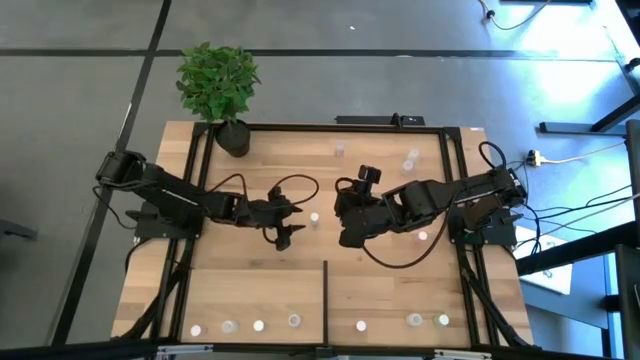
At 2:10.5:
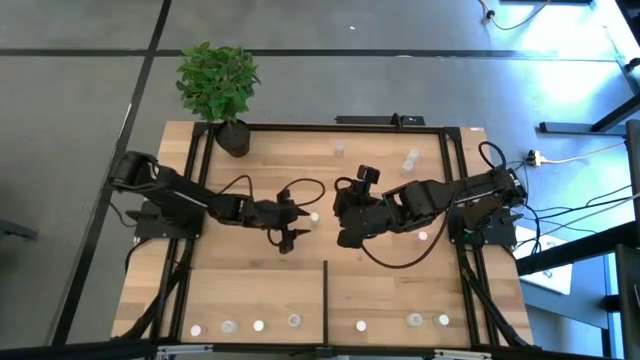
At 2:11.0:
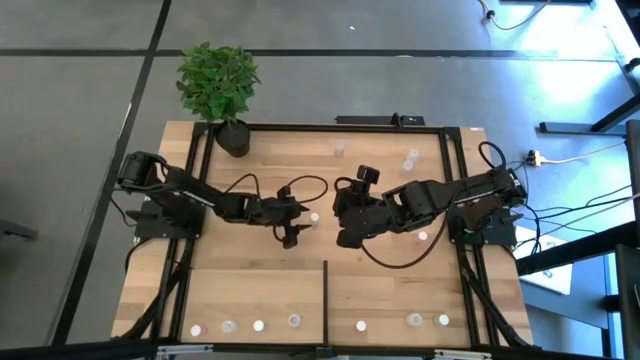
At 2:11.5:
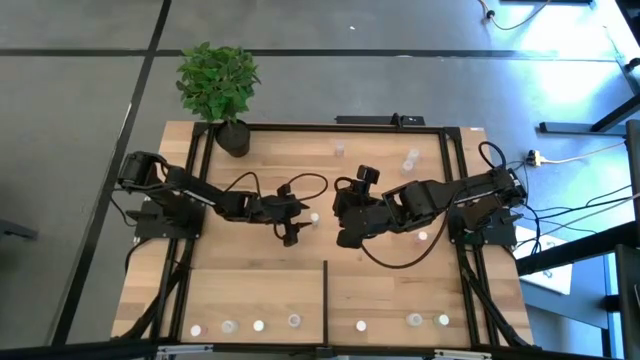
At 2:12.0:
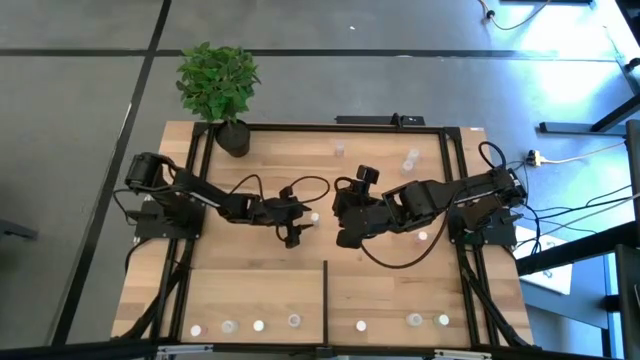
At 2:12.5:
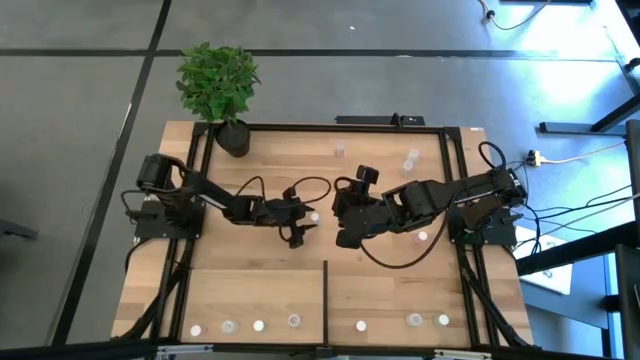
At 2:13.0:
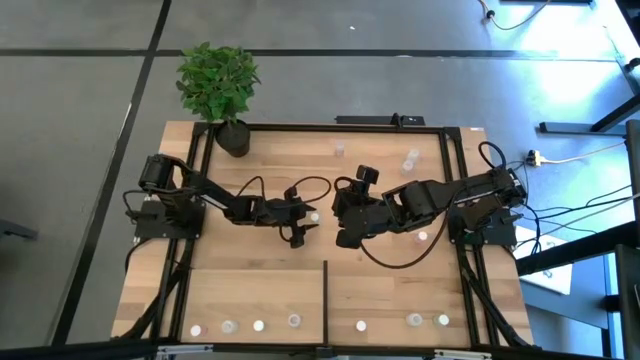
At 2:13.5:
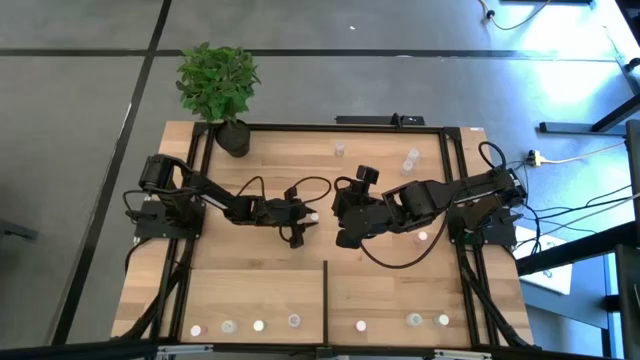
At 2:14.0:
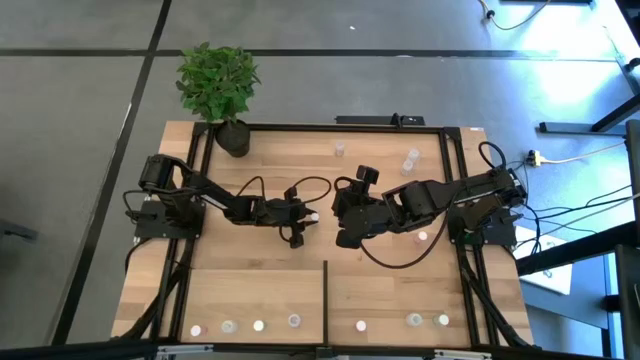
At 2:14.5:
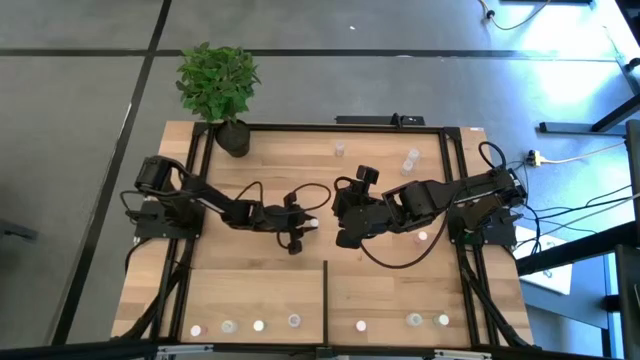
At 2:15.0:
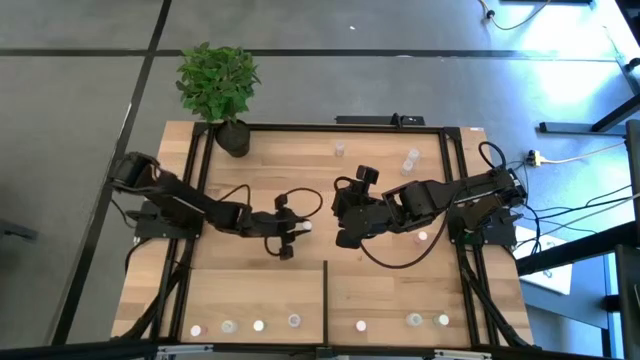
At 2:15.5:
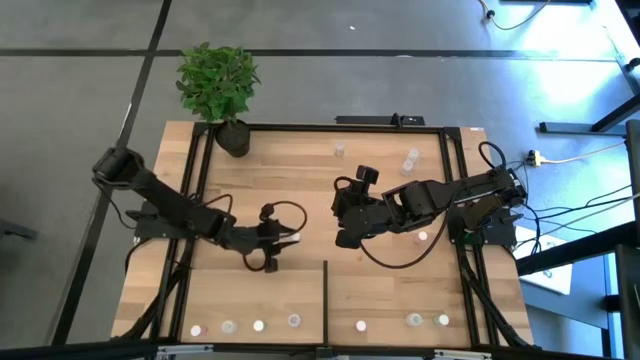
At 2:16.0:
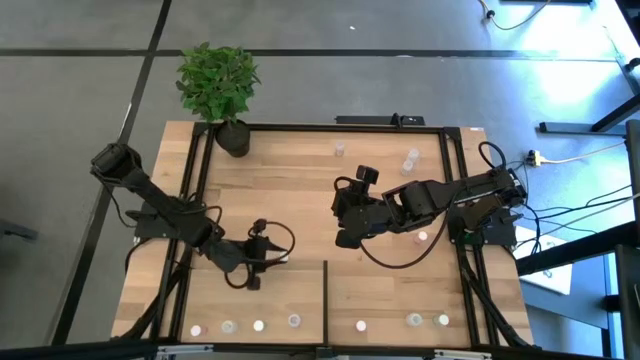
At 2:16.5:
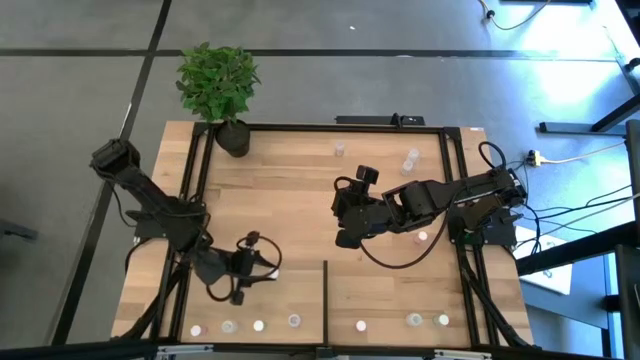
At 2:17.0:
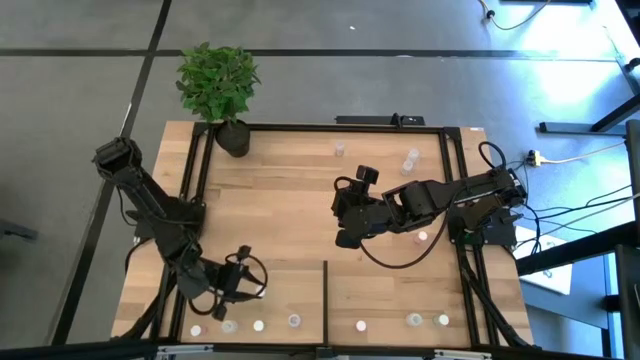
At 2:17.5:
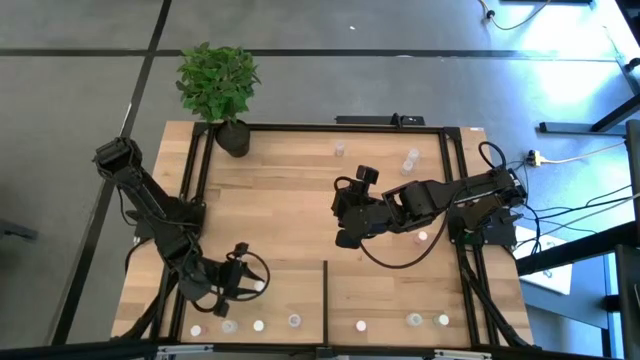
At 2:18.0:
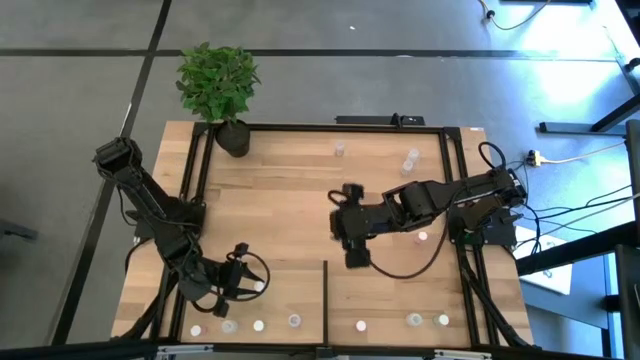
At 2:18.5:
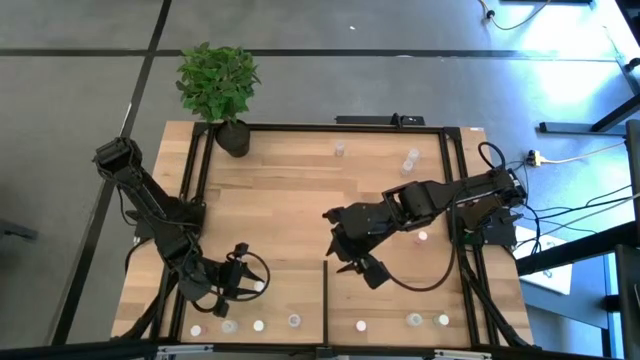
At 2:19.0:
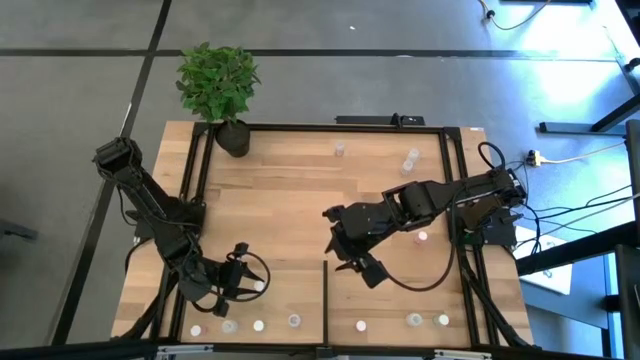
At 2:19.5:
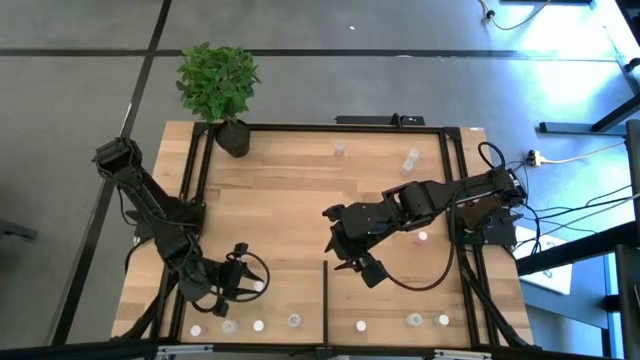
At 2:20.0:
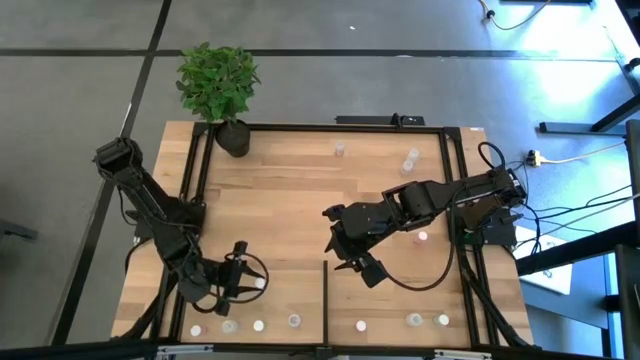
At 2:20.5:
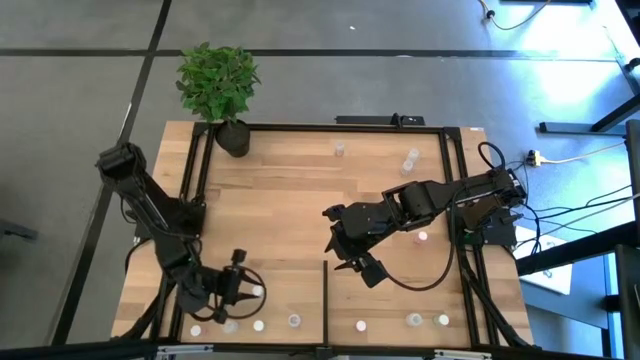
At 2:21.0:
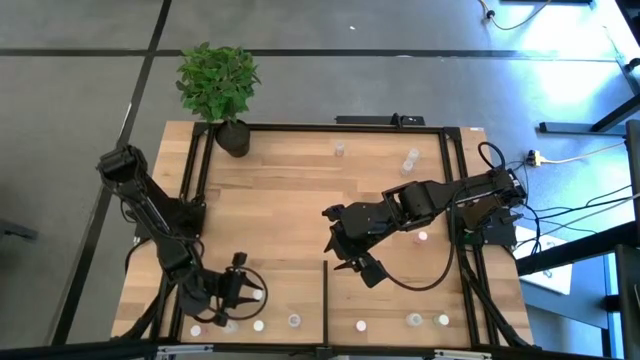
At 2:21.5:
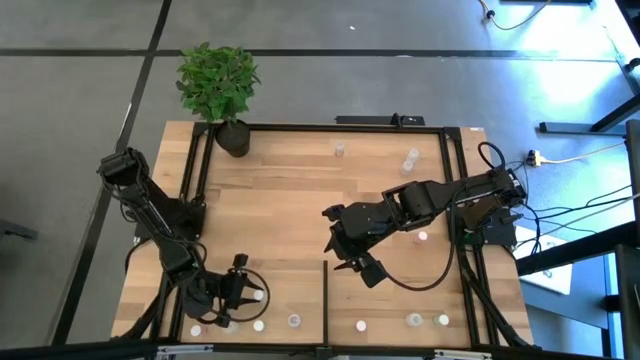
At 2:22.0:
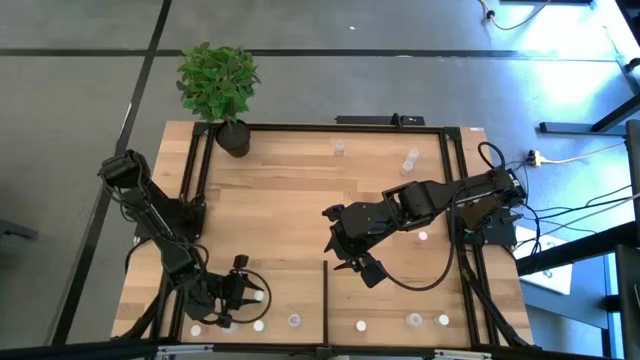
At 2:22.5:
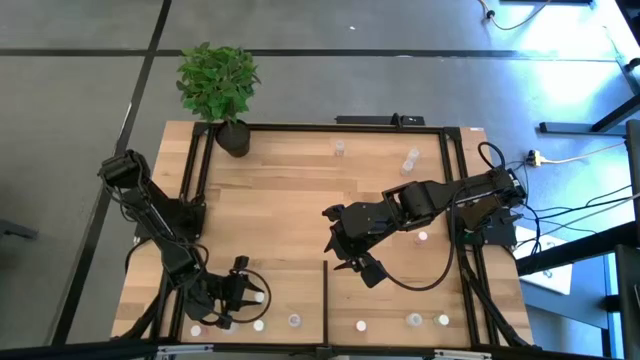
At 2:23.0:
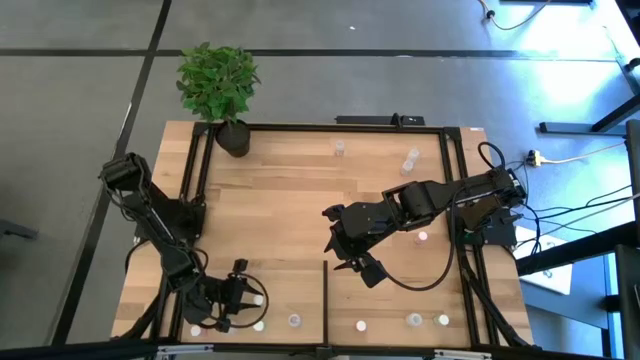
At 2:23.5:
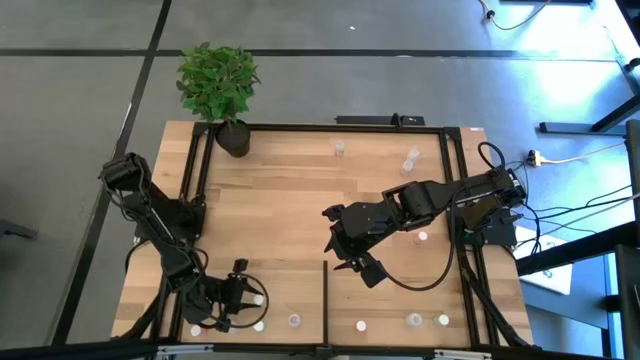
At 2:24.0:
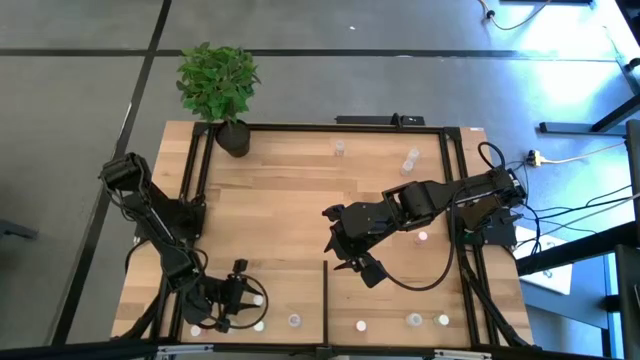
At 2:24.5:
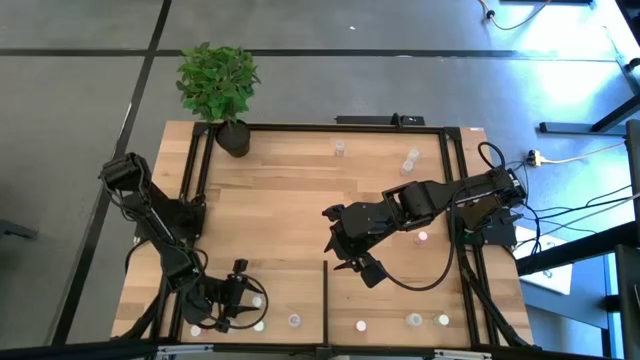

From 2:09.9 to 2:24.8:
Task: Pick and place medicine bottles onto shelf by color
Put the top green pill bottle on the shelf aligned with the other green pill bottle

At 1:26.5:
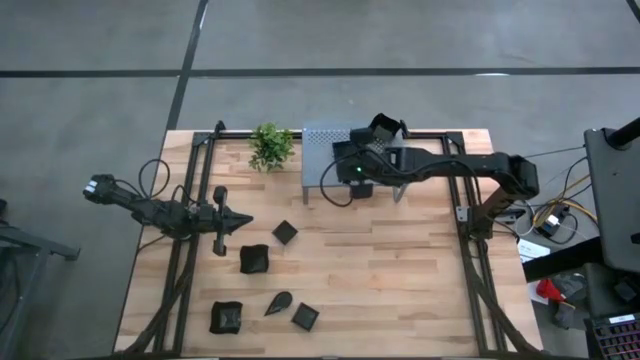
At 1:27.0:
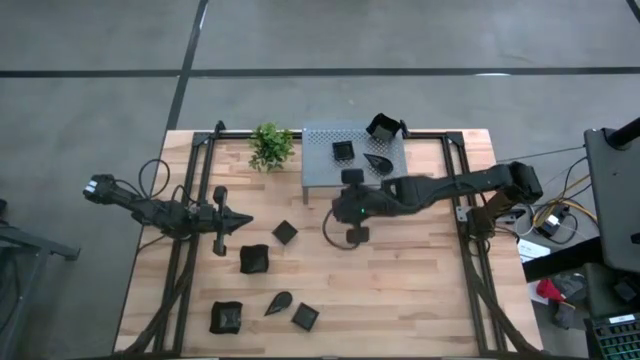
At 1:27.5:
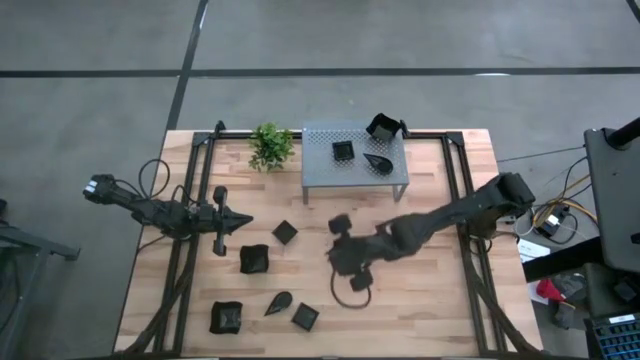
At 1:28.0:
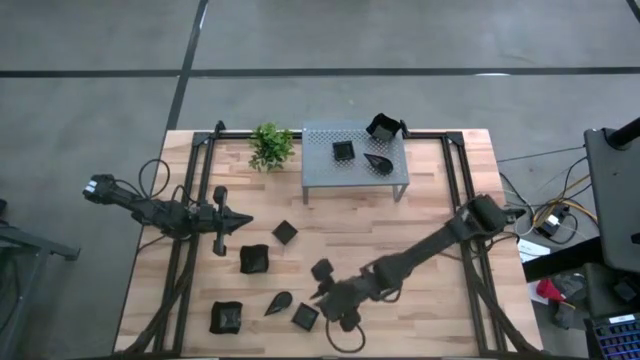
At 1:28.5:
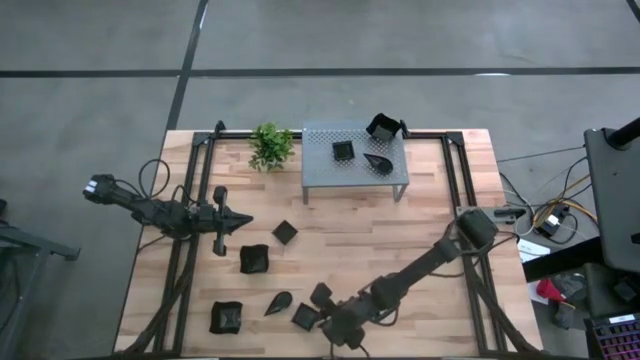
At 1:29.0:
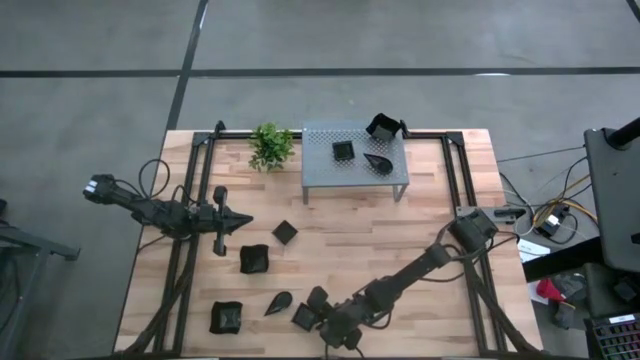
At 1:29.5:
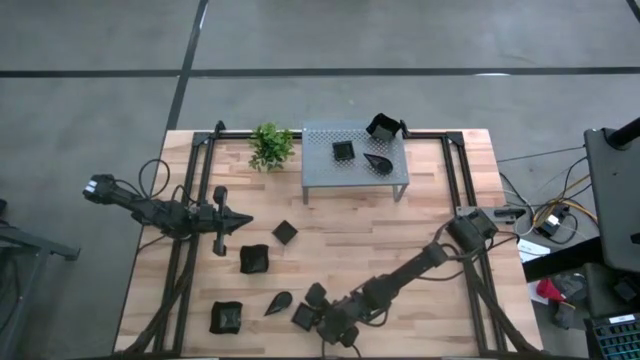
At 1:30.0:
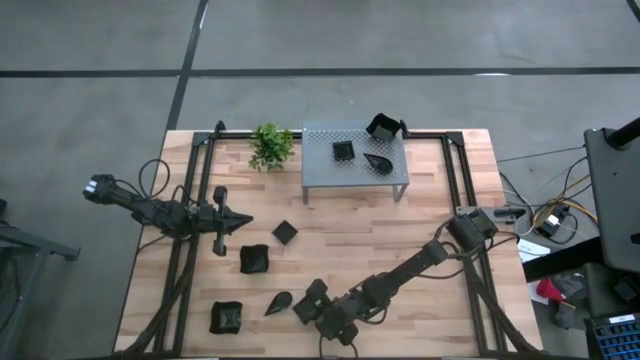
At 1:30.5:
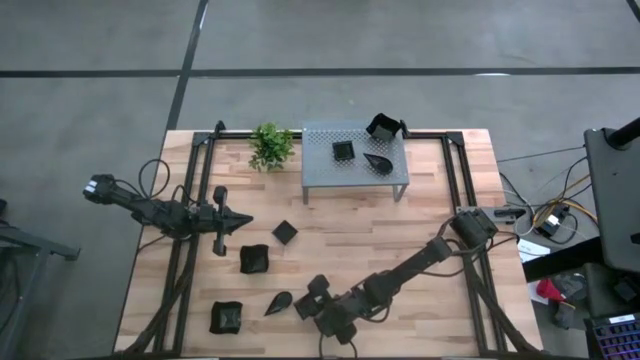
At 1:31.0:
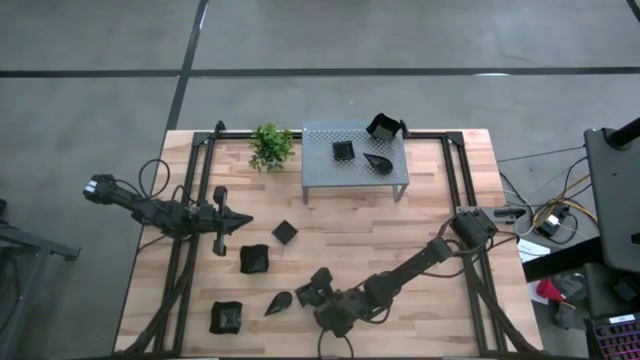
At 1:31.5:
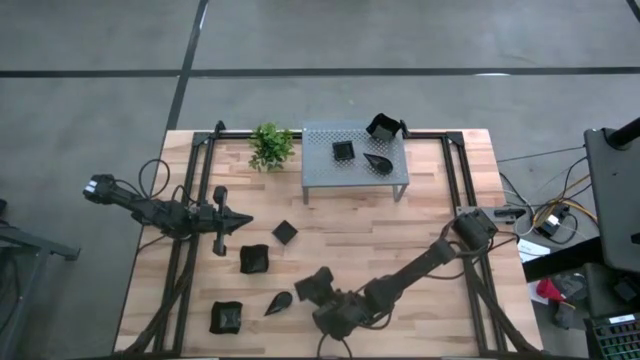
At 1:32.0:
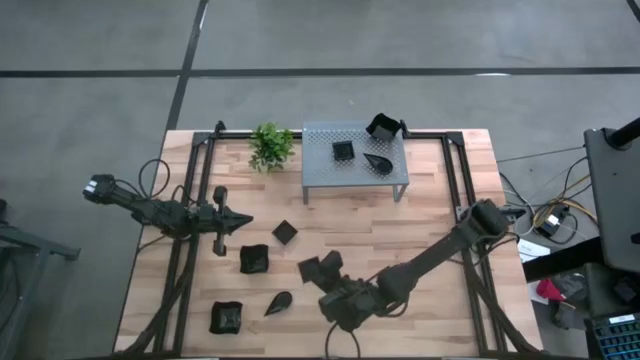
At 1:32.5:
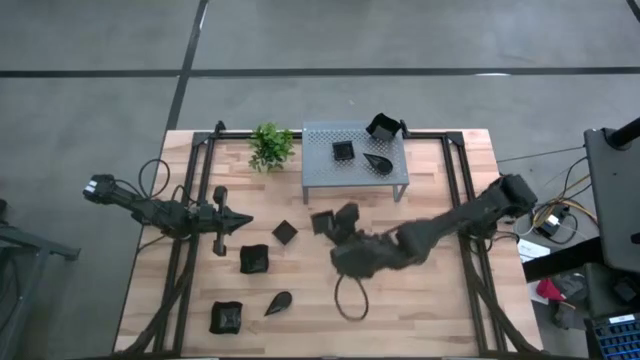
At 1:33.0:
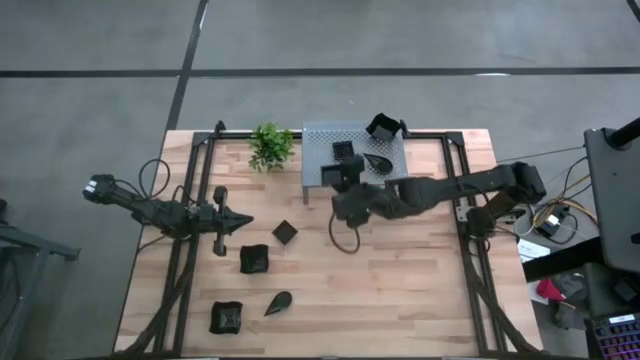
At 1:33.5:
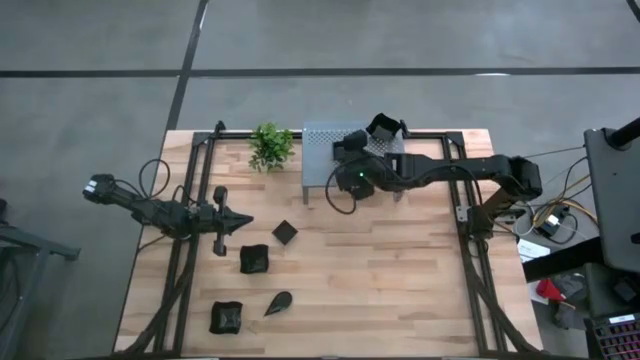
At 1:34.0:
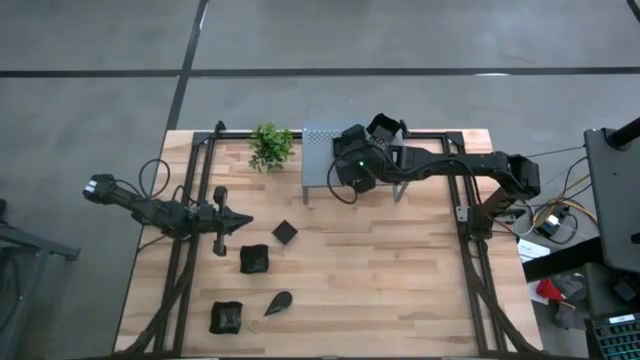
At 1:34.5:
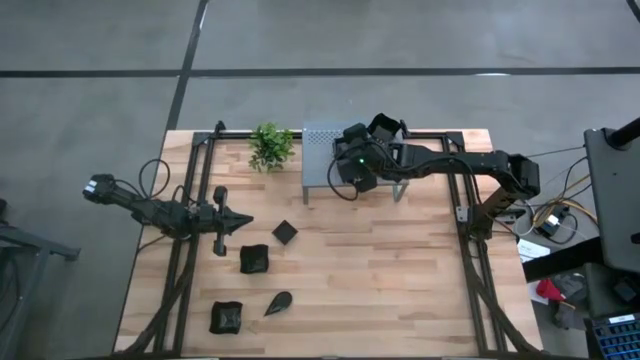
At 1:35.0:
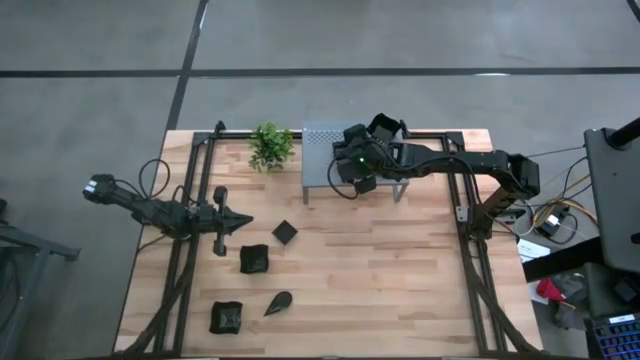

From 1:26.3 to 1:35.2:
Task: Pick & Place Mini shaped plates
Stack the square plate on top of the other square plate on the shelf
